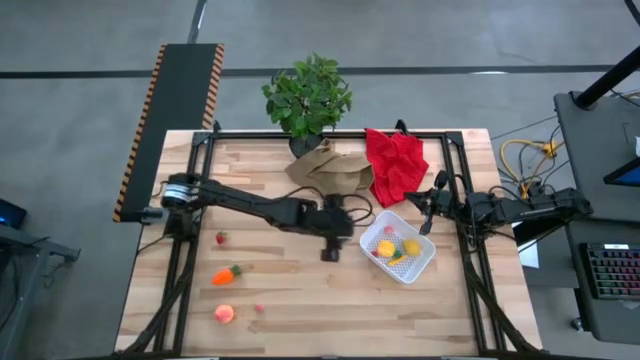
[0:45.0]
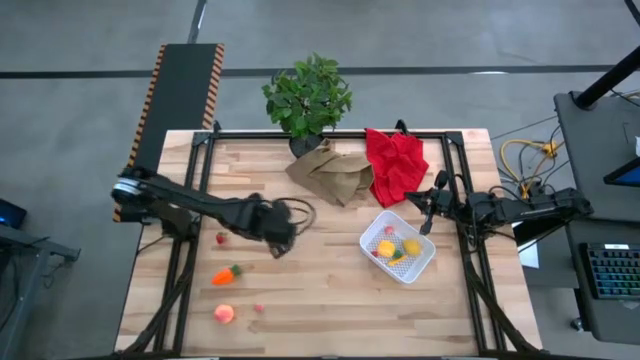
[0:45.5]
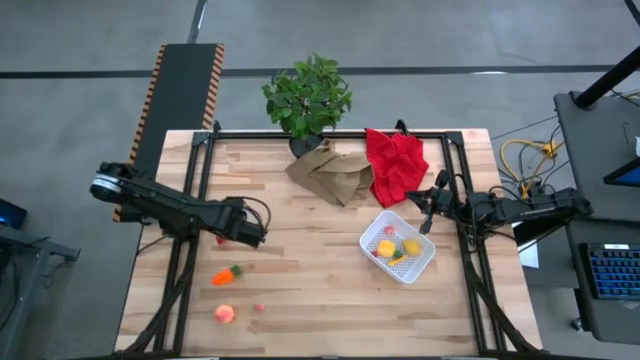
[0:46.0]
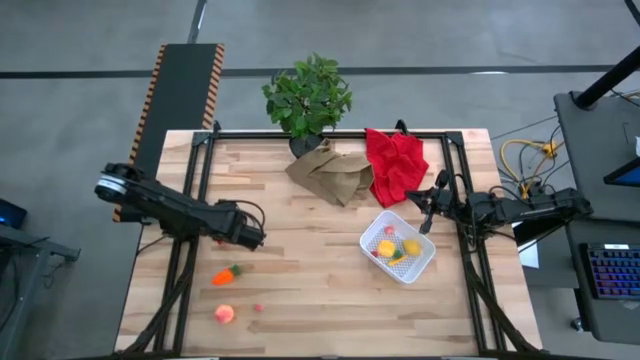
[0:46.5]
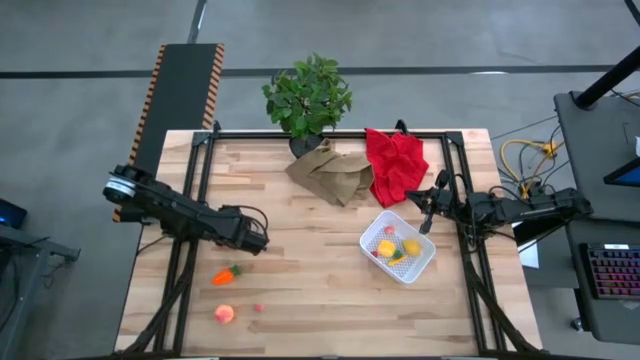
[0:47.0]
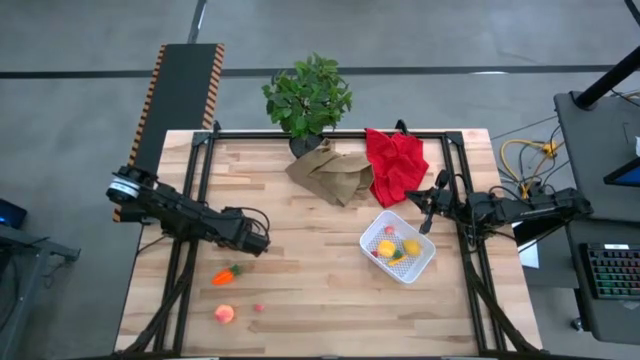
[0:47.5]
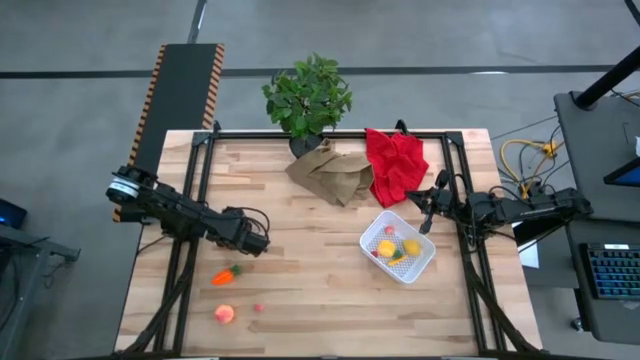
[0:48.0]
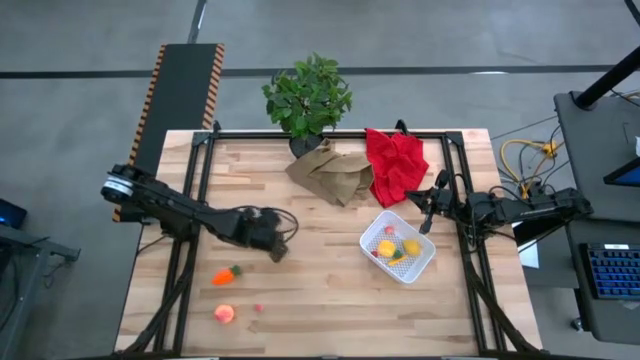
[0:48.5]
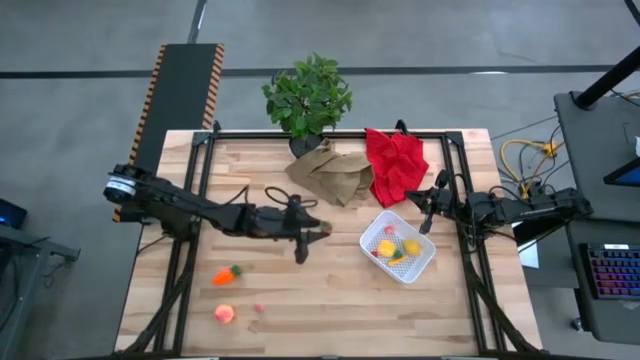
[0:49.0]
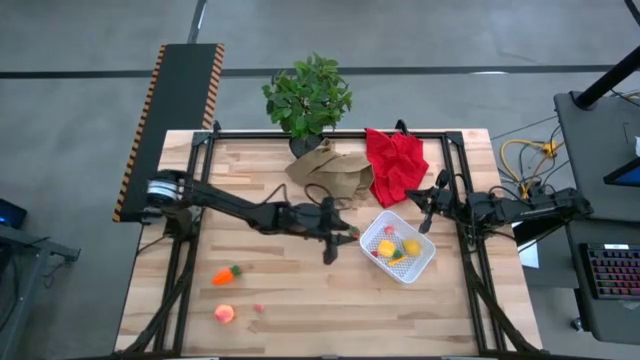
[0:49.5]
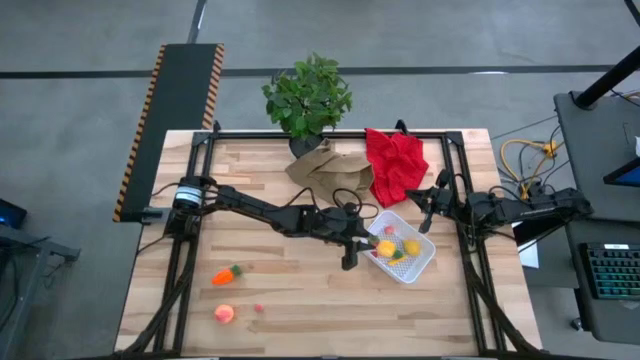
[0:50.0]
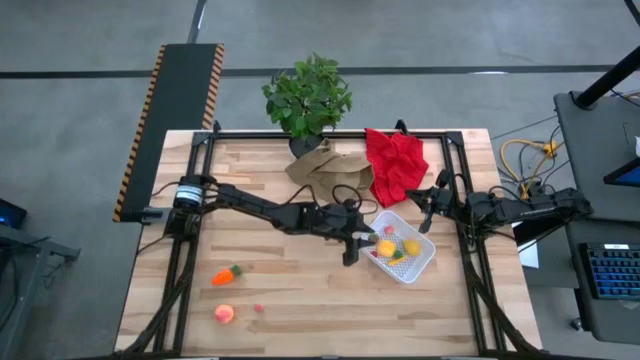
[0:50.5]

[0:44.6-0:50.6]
Task: Pick and placing Produce into tupperware
Put the red strawberry into the white bin

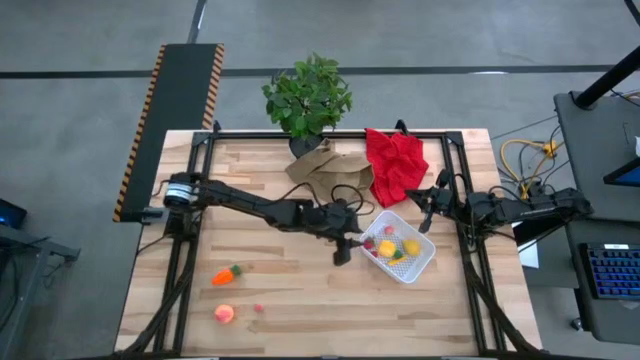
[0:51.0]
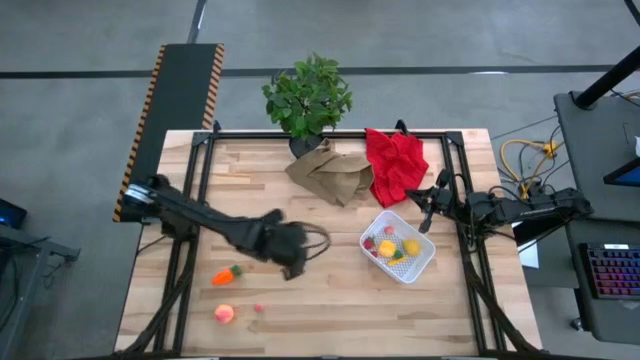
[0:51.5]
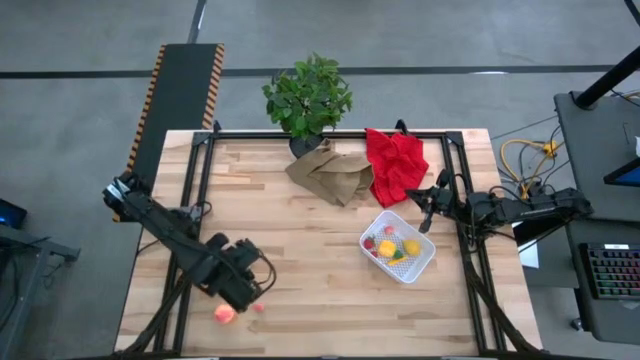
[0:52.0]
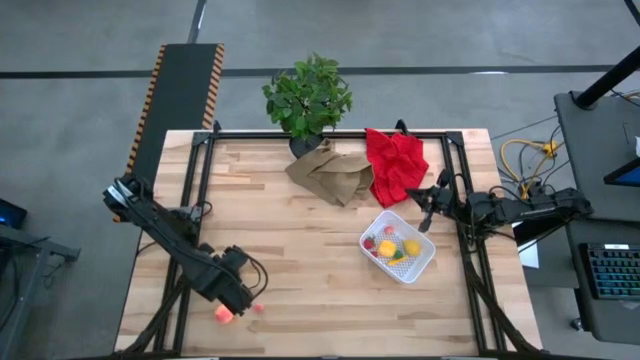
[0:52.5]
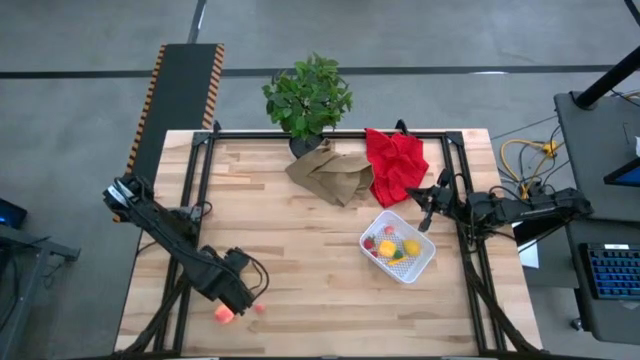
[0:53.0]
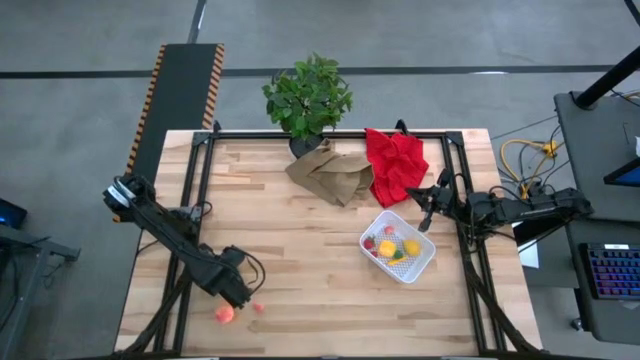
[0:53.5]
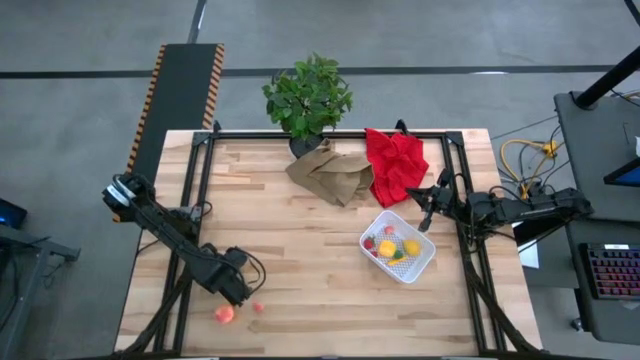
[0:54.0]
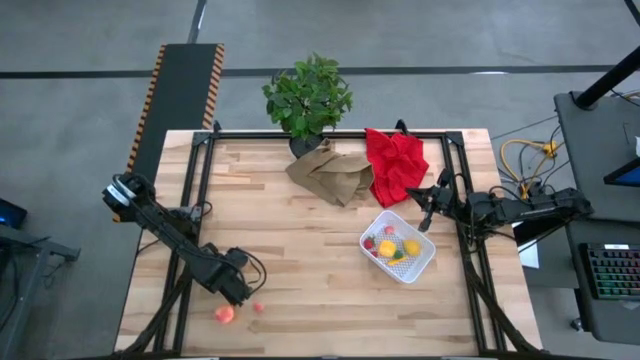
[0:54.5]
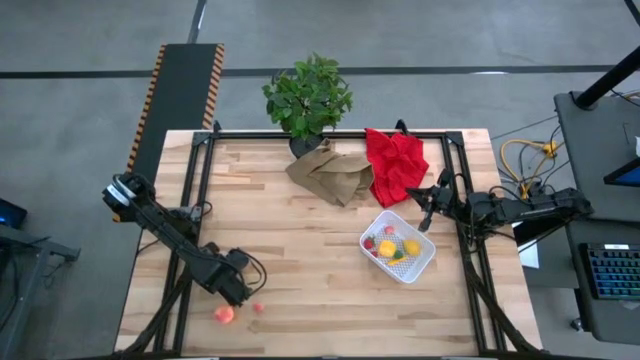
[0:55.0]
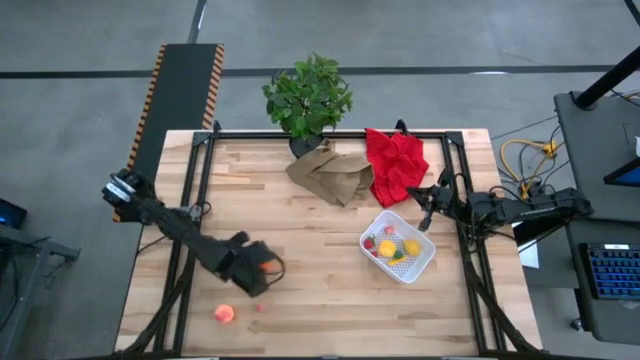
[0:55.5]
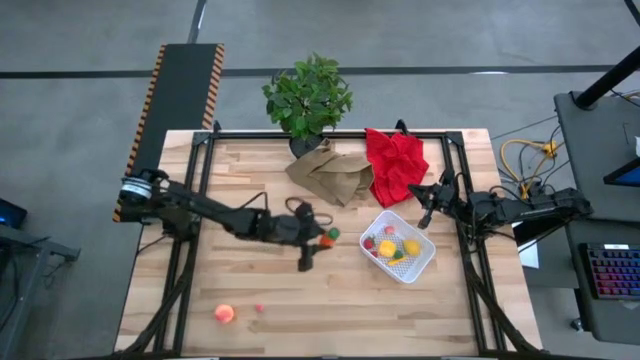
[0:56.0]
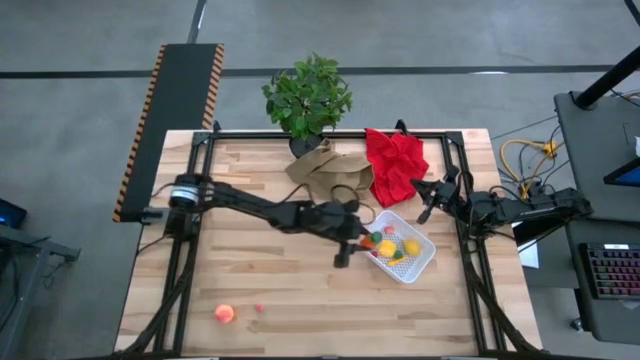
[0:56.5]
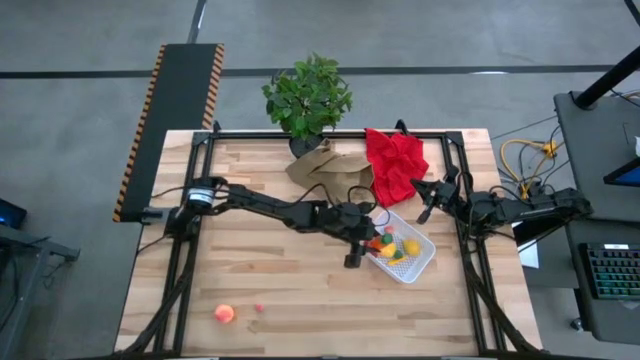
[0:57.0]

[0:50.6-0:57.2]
Put the orange carrot into the white bin

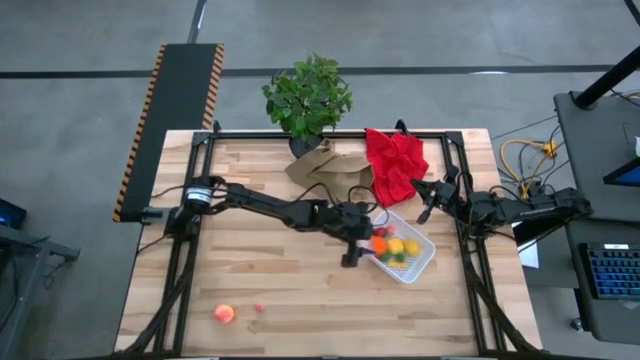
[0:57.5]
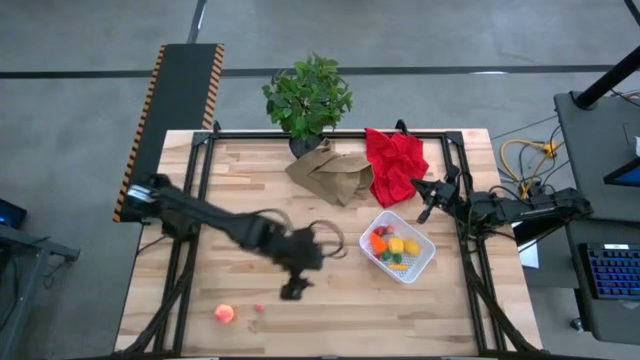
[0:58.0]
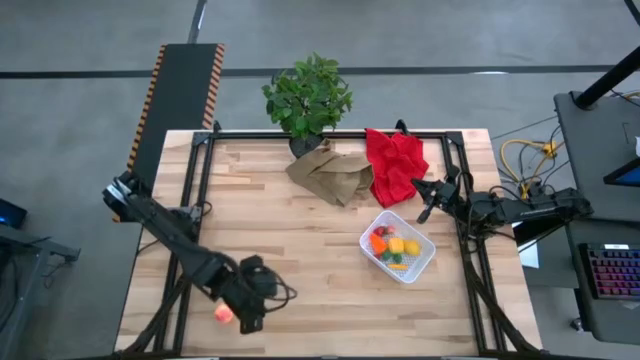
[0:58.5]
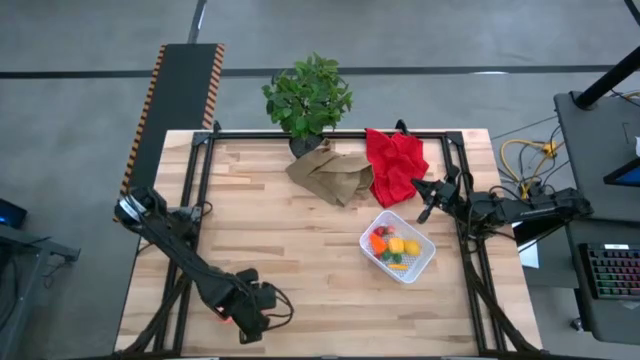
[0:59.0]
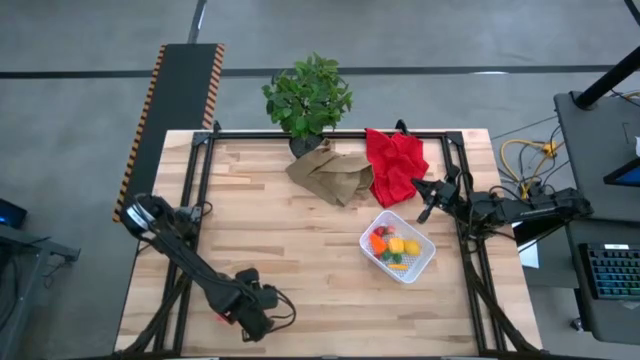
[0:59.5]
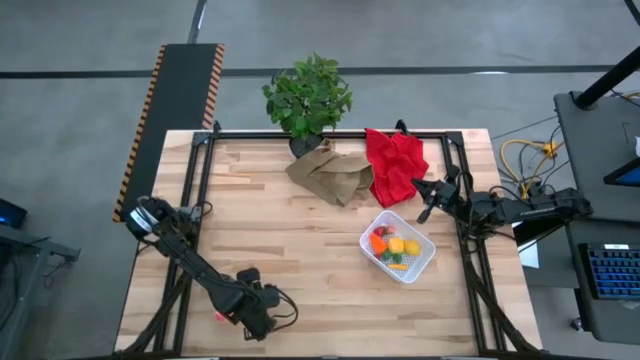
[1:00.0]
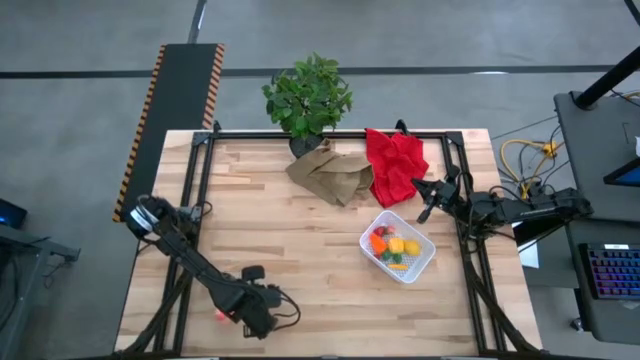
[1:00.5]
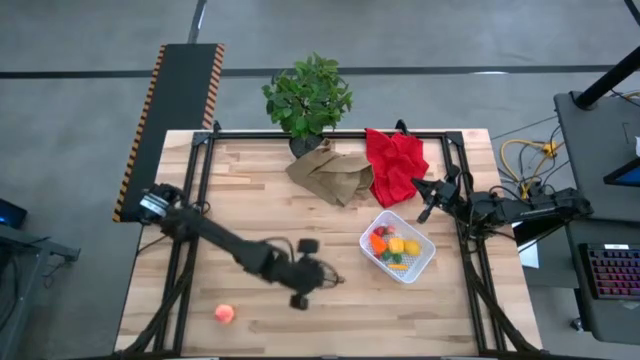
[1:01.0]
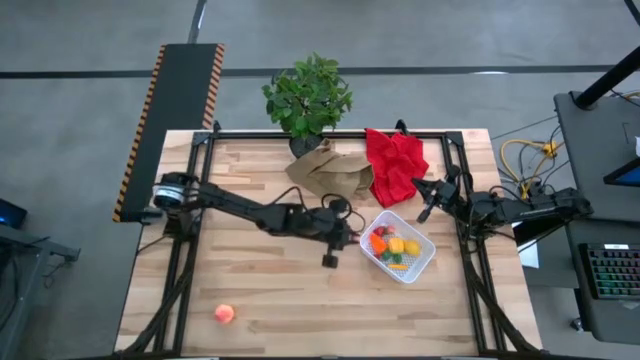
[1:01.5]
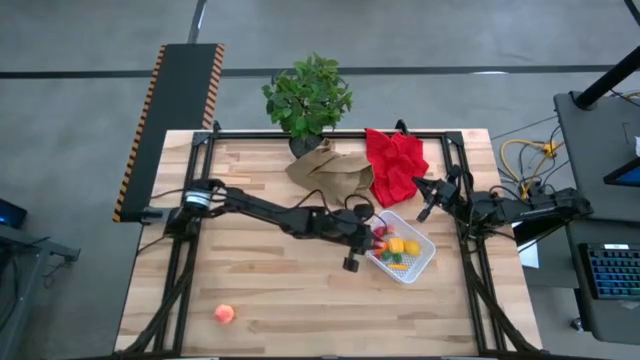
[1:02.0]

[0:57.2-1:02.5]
Put the small peach into the white bin

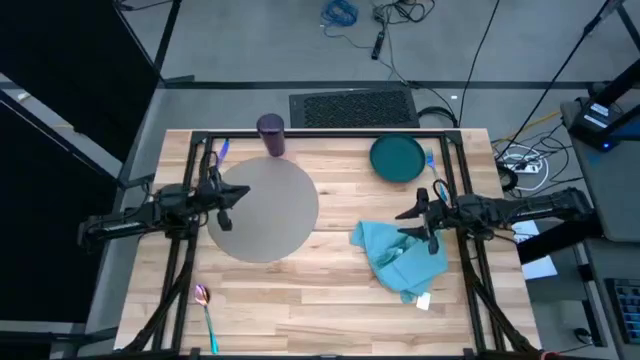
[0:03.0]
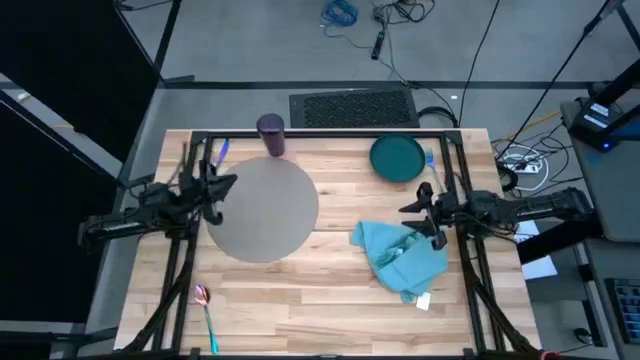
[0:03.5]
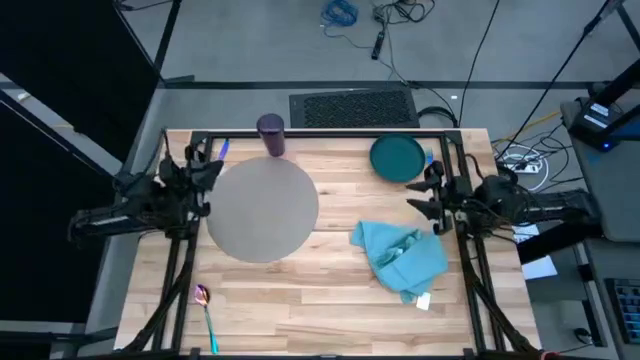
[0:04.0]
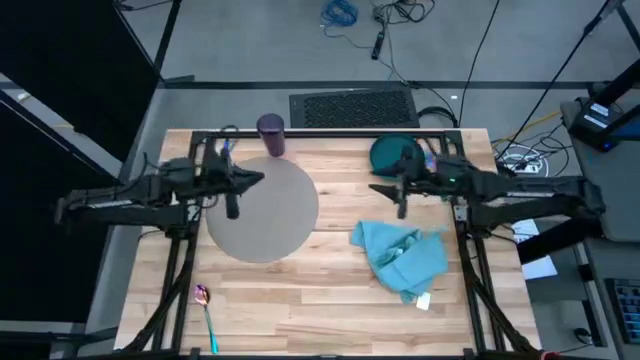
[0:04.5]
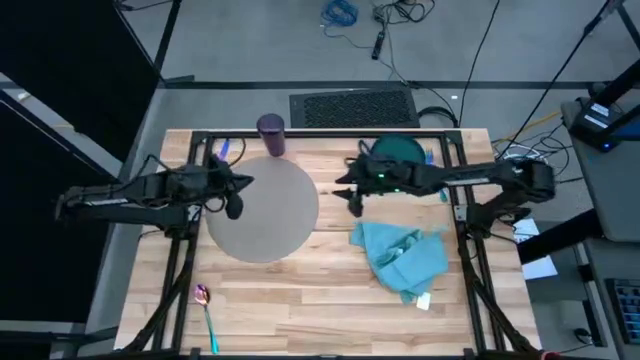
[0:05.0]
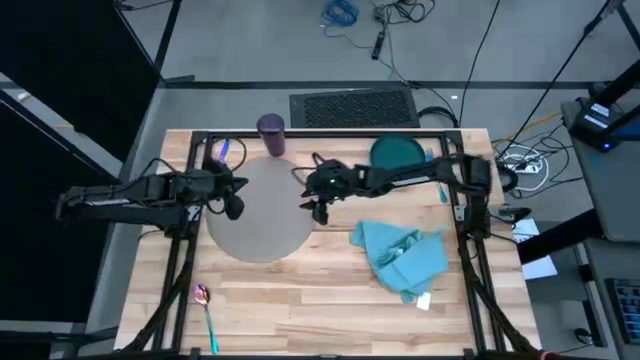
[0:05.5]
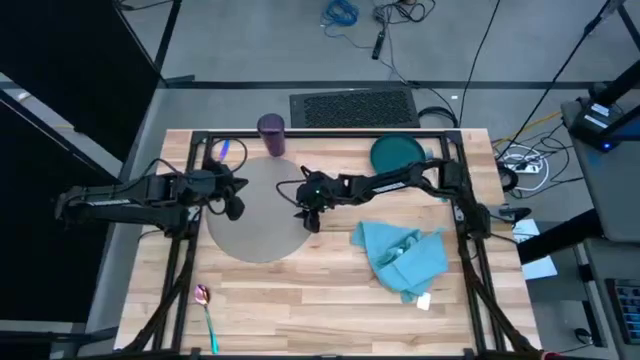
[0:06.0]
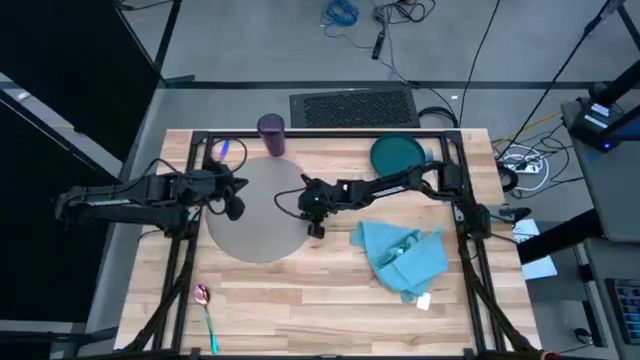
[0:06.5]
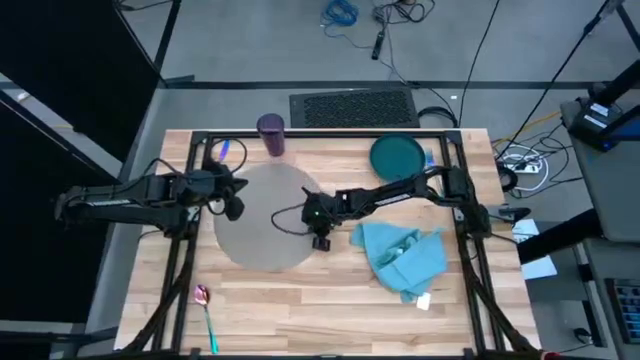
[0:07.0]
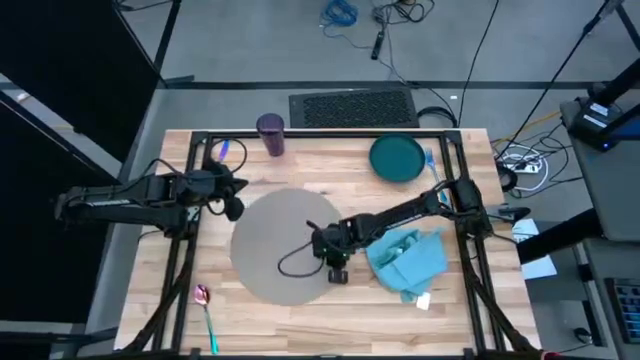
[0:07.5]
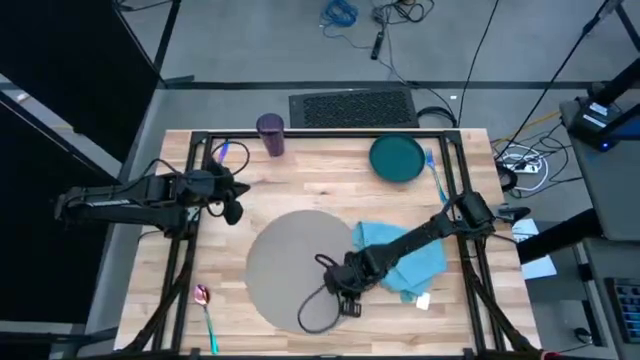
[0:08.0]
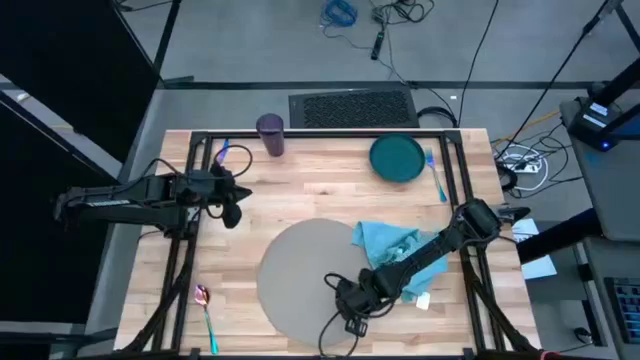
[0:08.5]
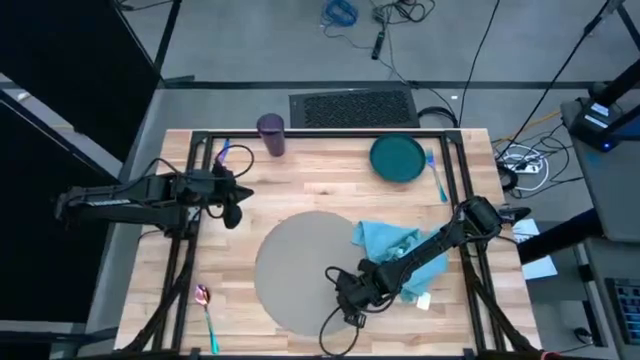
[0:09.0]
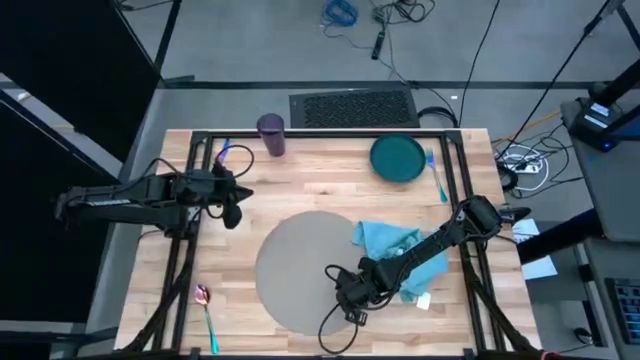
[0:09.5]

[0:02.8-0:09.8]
Task: Set table place
Move the gray placemat to the middle of the table
